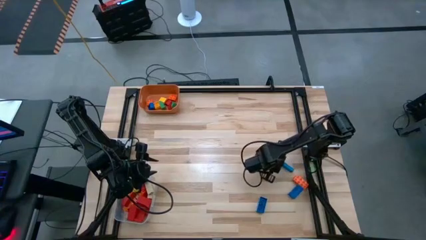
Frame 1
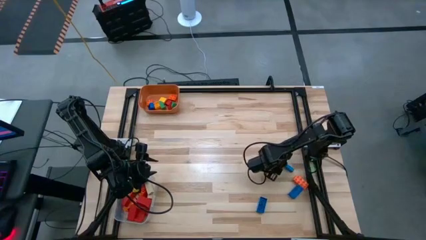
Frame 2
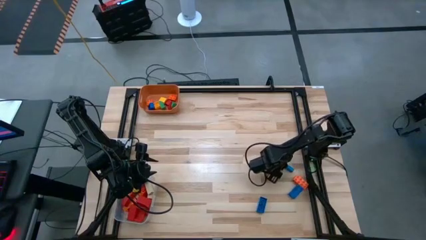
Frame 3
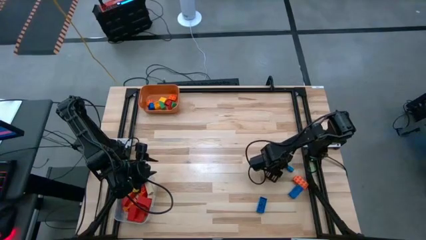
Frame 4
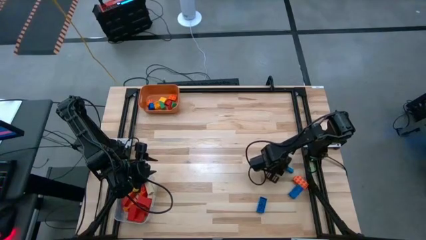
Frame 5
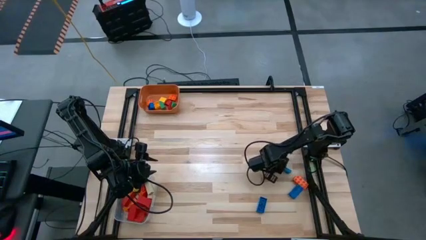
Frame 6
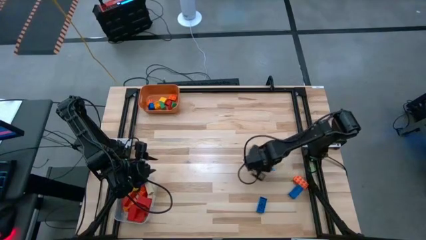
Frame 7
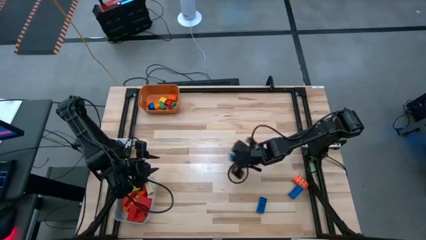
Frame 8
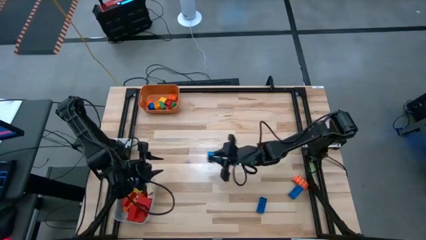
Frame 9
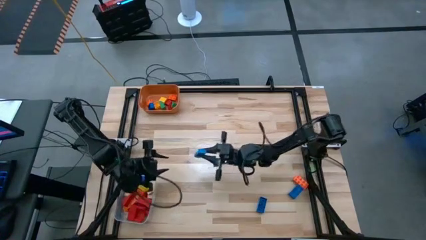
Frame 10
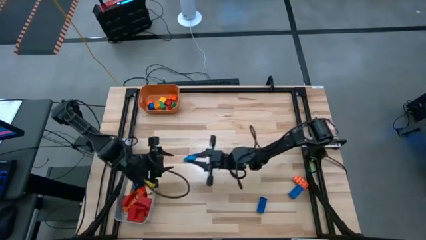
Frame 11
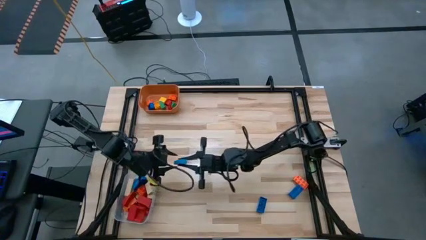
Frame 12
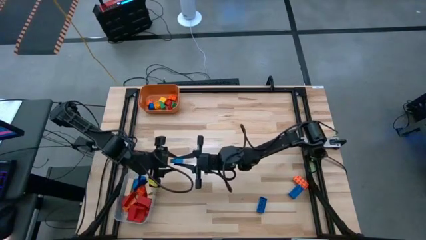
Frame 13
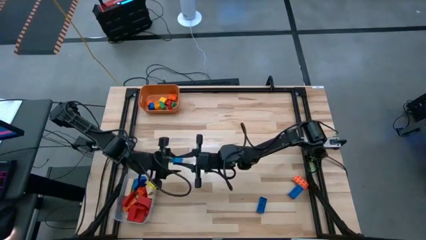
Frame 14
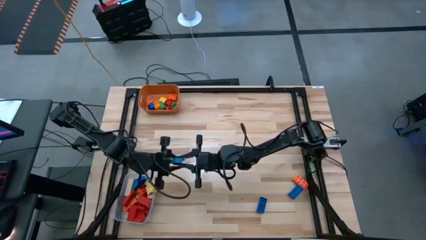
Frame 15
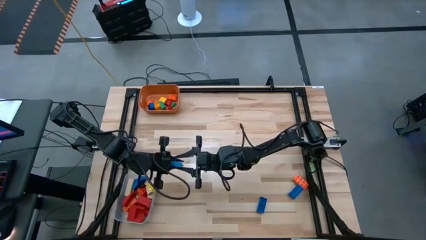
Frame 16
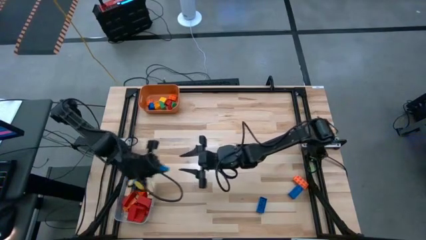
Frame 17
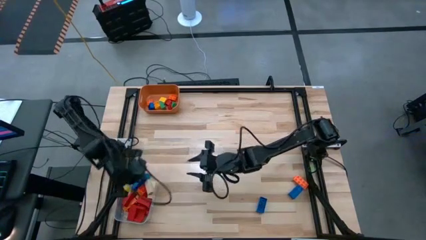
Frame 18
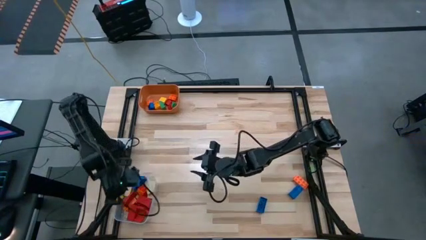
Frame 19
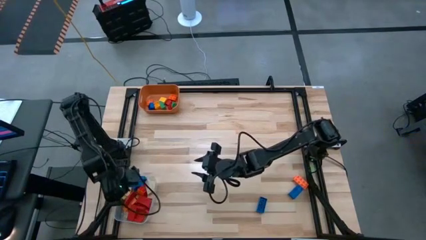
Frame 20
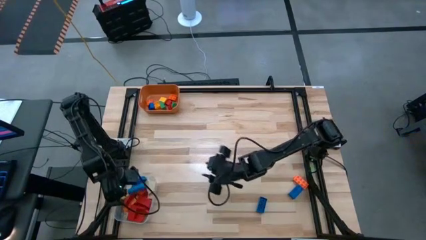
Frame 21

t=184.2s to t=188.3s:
Task: Sort blocks by size
Put the large blue block into the transparent bin

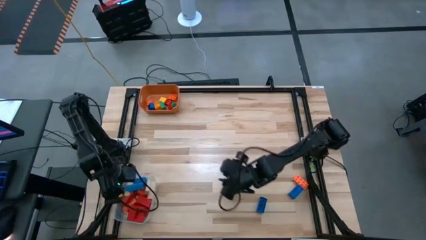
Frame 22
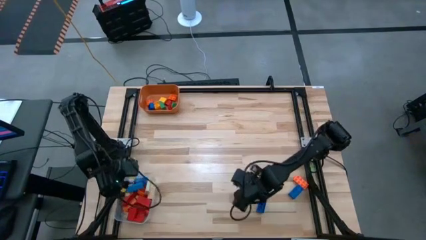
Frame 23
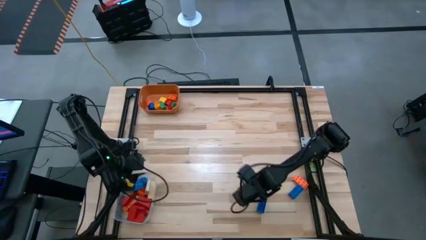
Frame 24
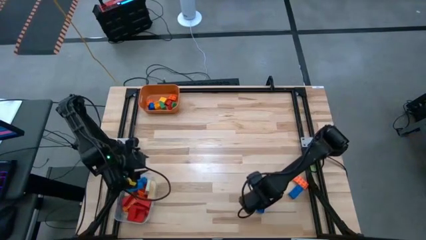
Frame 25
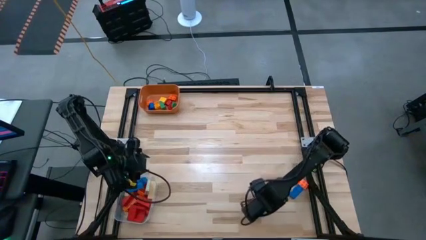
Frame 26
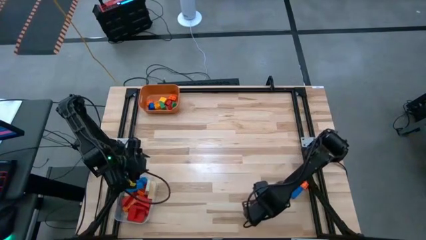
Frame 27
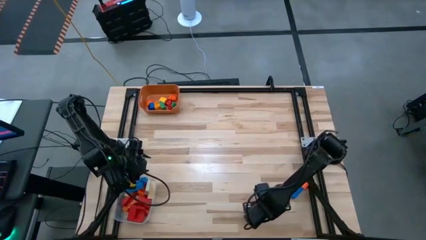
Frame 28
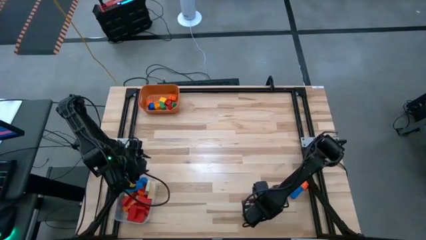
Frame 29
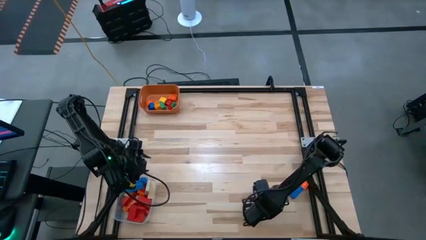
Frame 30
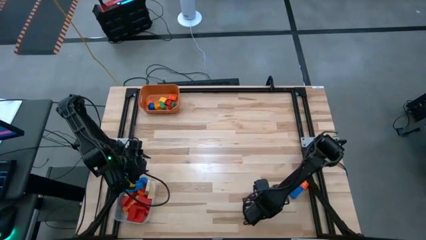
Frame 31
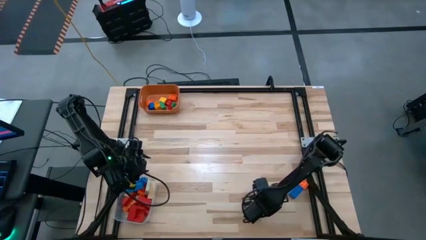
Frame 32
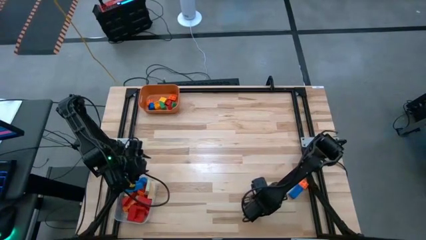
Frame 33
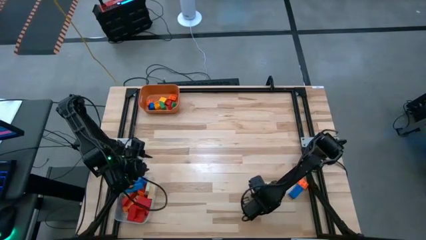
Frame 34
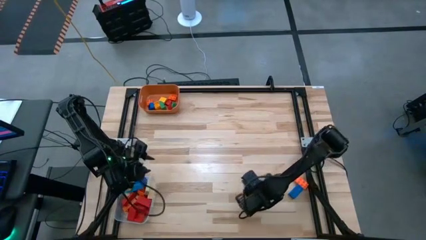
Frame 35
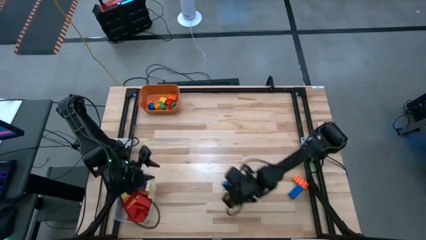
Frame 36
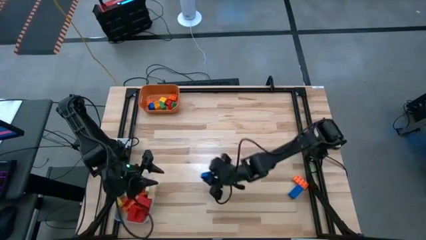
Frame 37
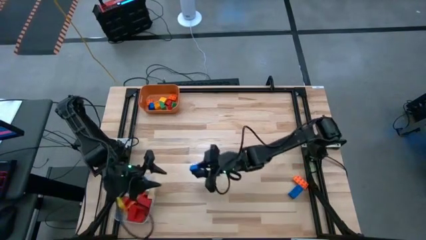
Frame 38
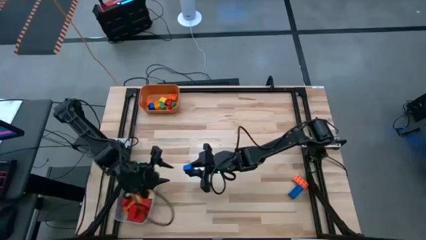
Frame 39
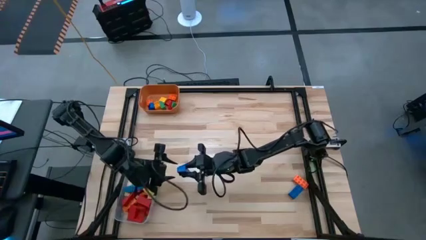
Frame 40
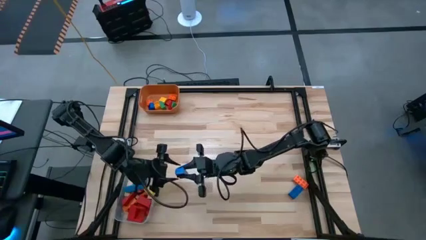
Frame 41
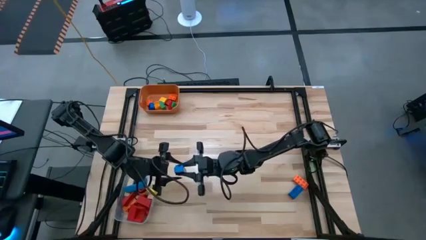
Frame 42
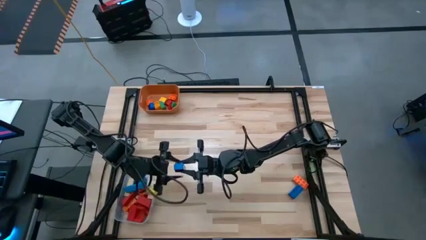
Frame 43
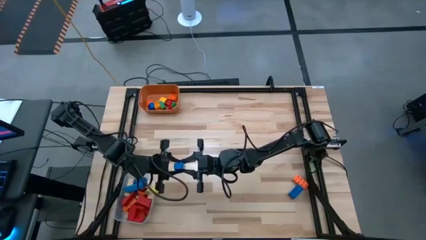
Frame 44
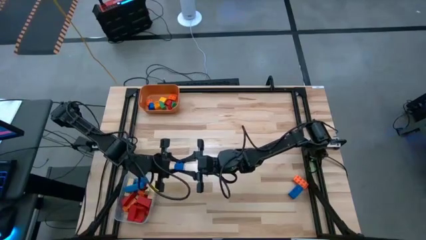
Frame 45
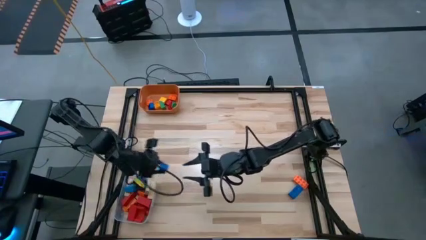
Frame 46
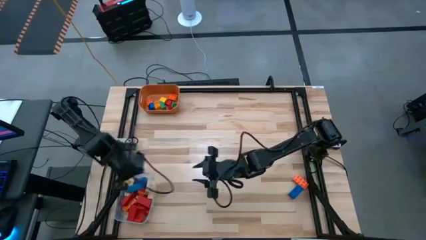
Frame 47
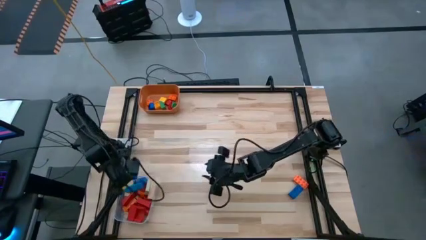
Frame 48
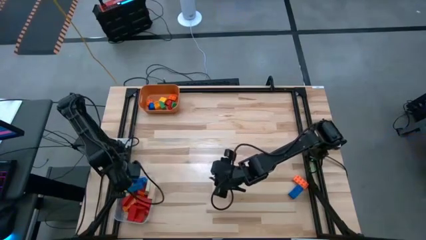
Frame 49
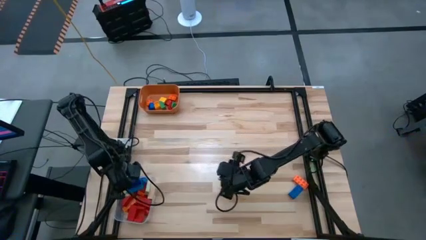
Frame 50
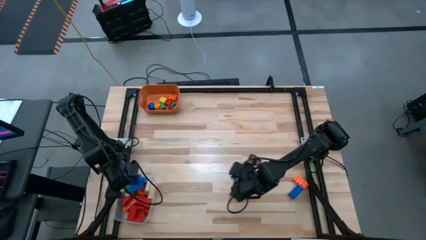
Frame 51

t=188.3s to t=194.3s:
Put the large blue game piece into the transparent bin

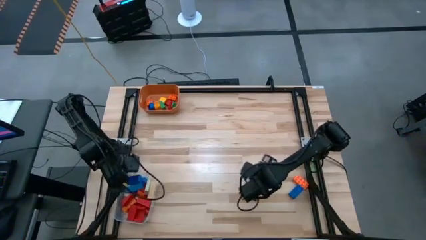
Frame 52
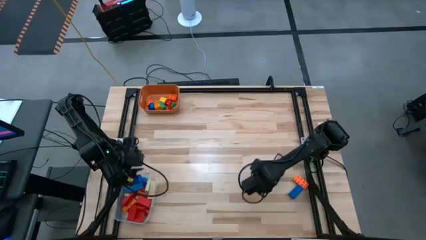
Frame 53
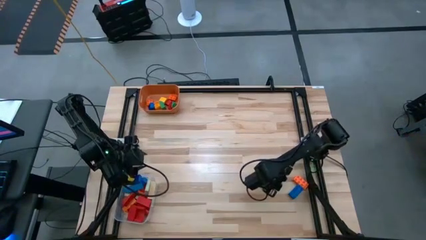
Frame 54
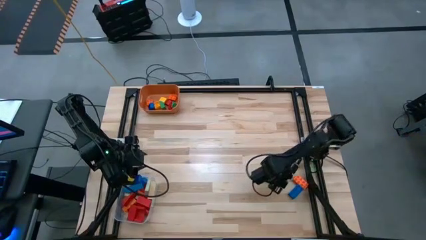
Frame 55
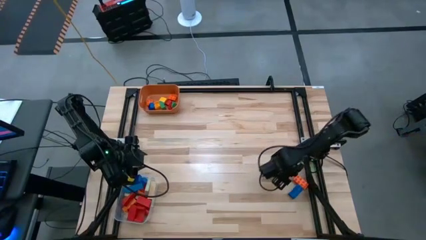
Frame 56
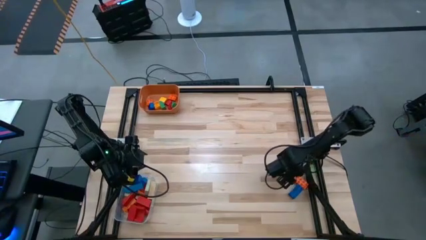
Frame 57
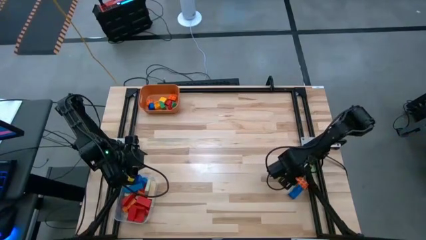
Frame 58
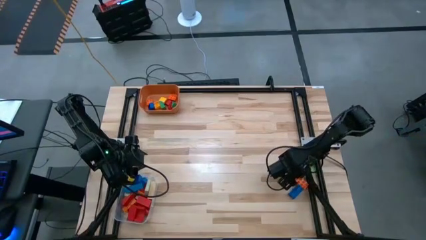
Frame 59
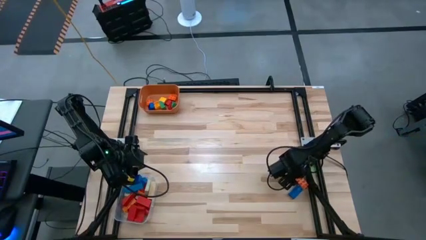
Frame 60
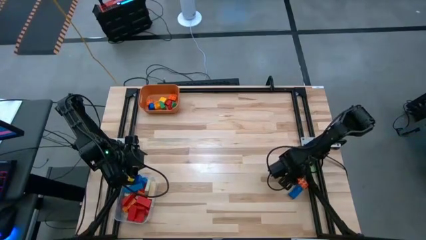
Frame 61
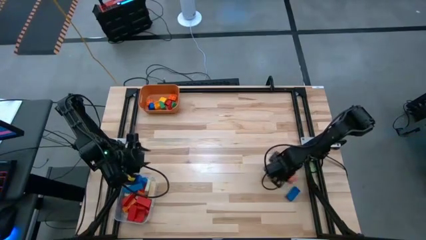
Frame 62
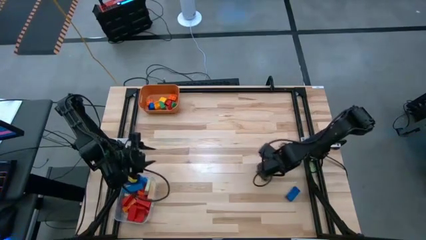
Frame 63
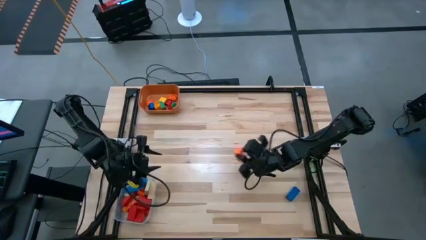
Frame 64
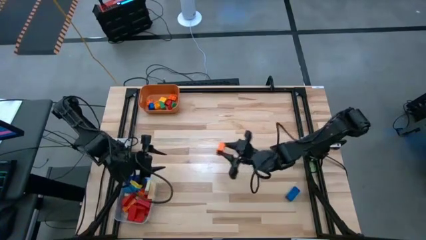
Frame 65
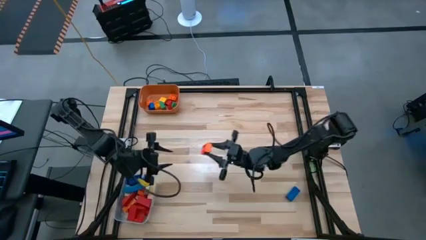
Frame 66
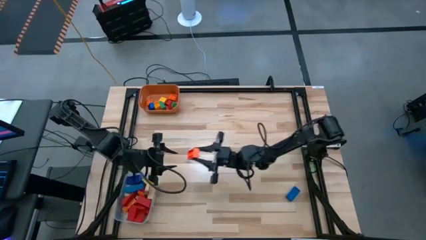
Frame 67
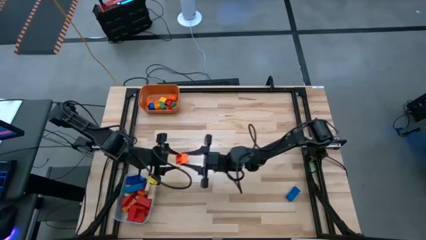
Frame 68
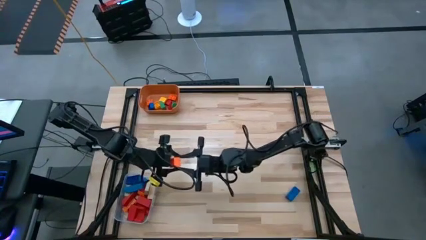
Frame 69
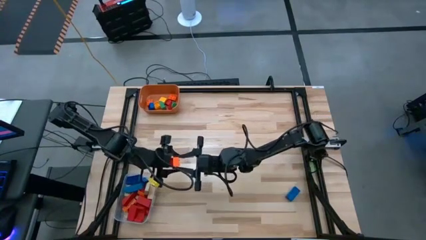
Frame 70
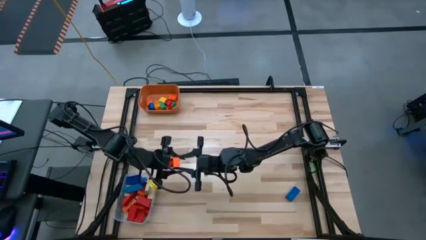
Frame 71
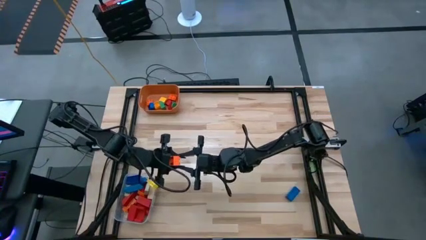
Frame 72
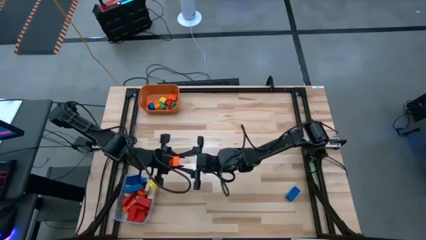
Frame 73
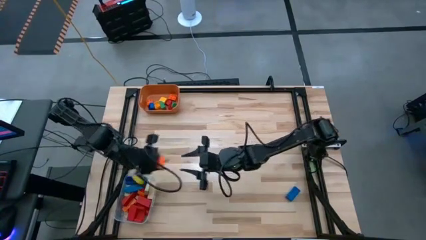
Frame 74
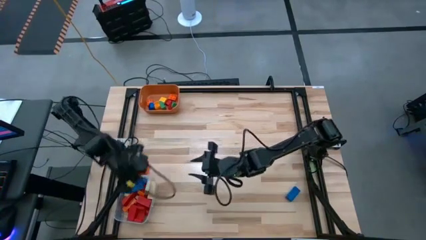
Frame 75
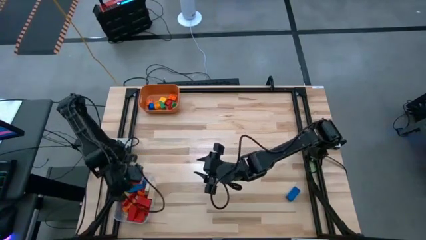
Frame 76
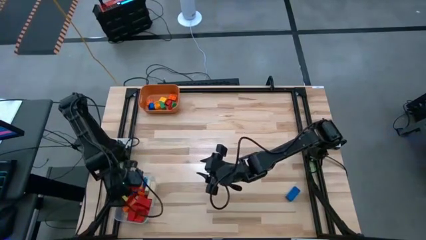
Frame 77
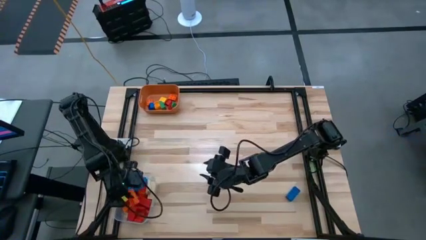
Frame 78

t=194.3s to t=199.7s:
Put the large orange game piece into the transparent bin
